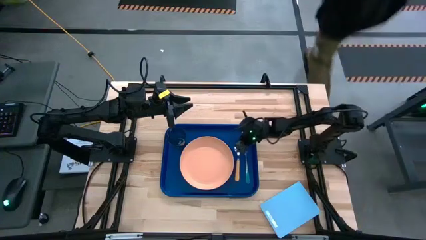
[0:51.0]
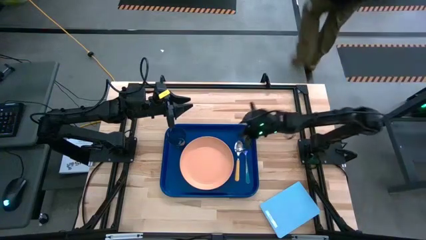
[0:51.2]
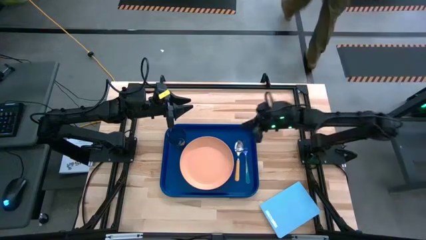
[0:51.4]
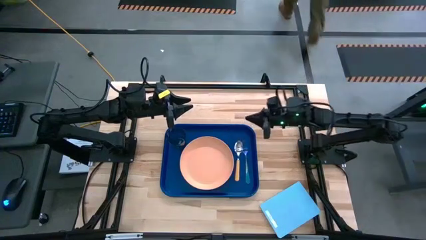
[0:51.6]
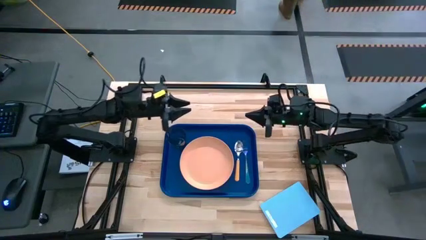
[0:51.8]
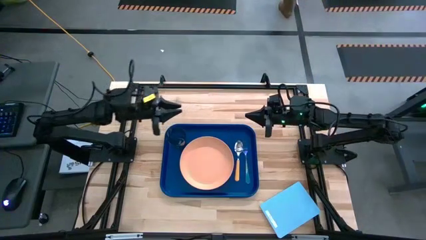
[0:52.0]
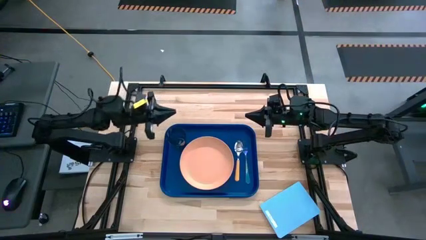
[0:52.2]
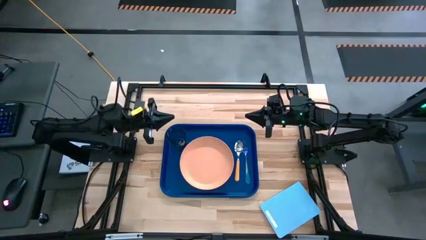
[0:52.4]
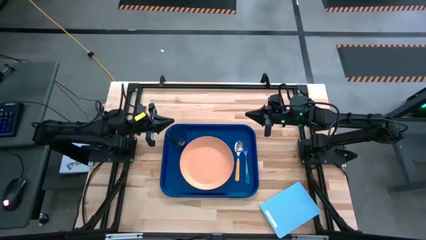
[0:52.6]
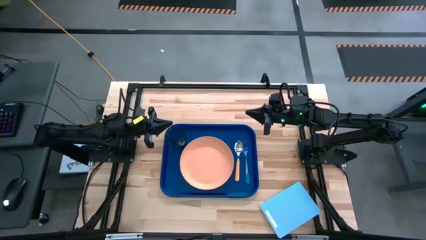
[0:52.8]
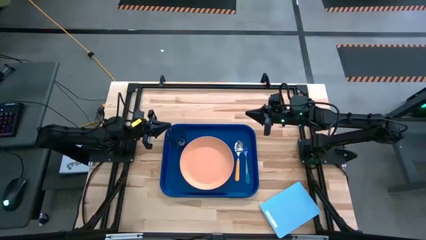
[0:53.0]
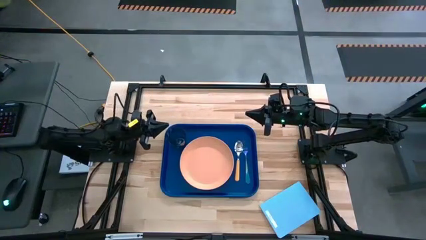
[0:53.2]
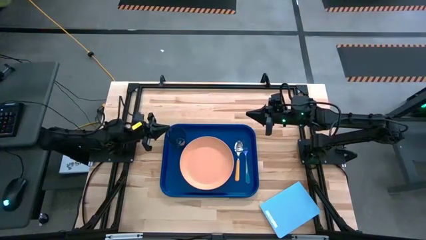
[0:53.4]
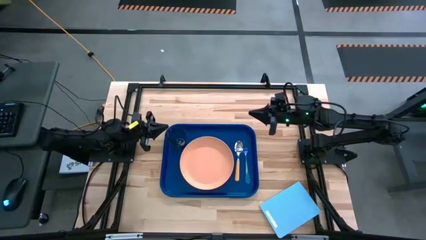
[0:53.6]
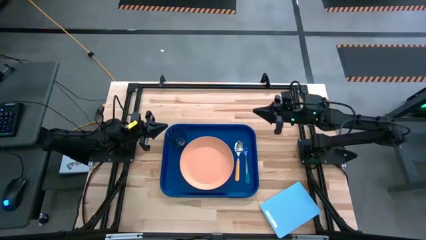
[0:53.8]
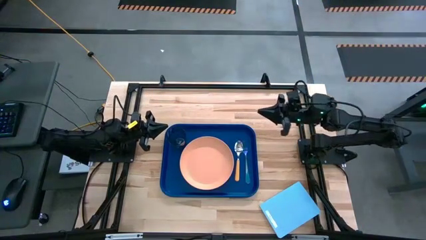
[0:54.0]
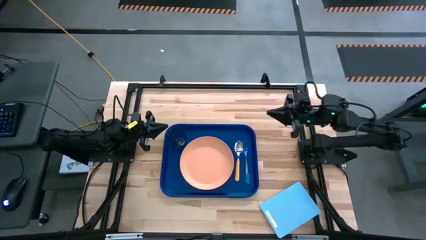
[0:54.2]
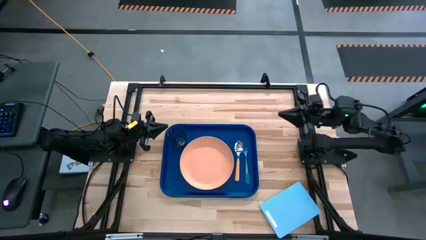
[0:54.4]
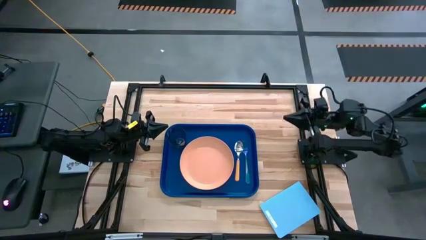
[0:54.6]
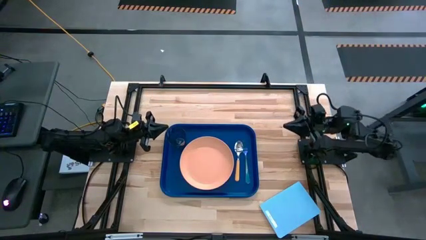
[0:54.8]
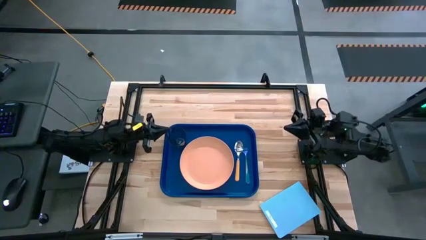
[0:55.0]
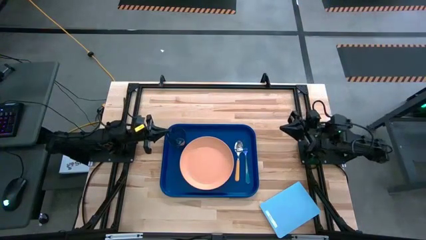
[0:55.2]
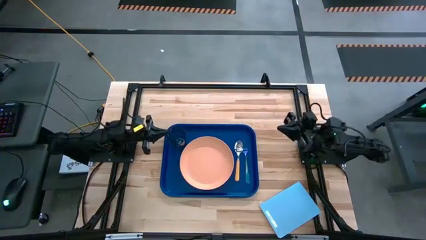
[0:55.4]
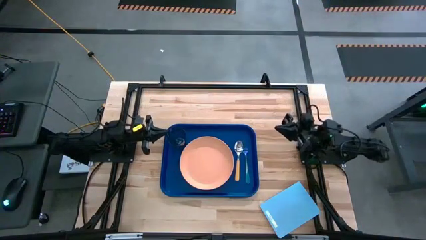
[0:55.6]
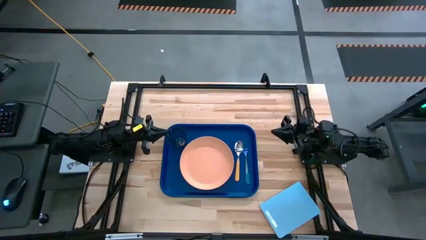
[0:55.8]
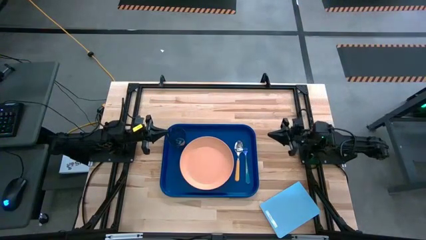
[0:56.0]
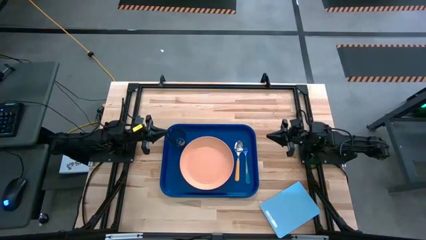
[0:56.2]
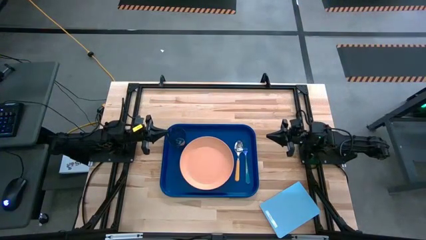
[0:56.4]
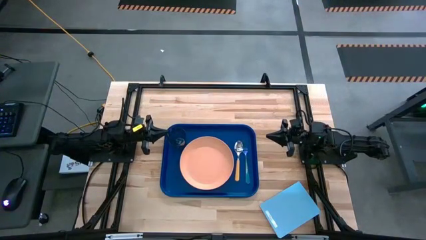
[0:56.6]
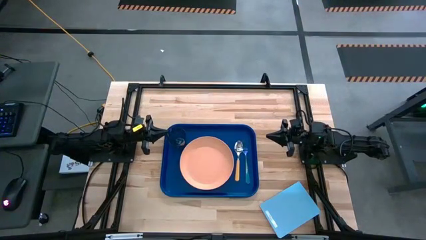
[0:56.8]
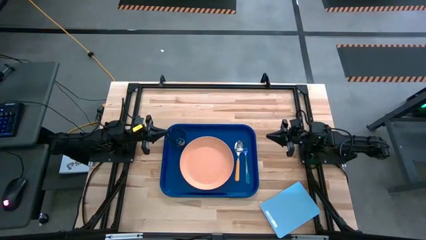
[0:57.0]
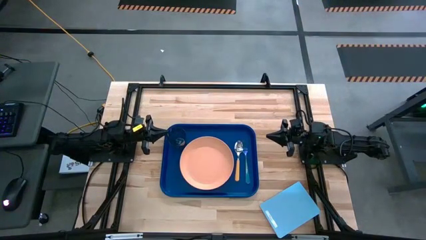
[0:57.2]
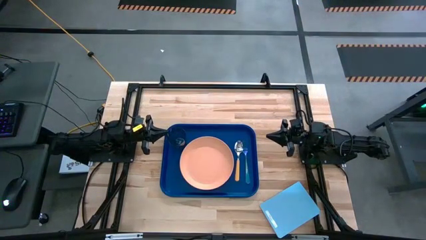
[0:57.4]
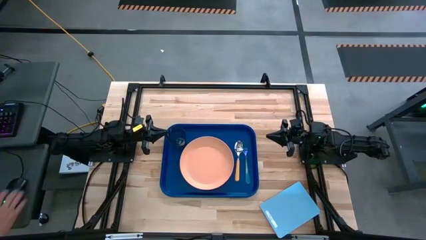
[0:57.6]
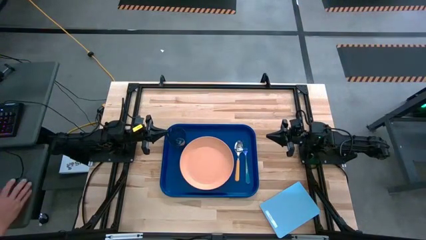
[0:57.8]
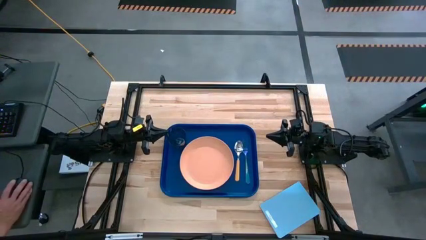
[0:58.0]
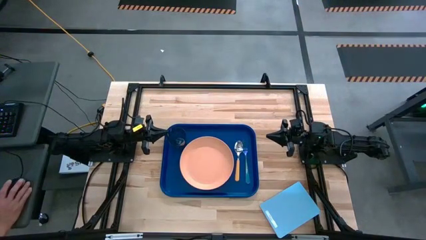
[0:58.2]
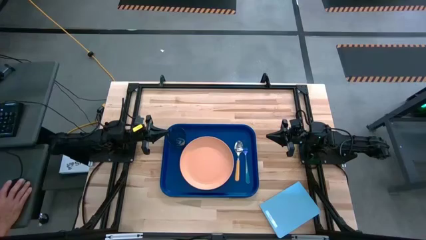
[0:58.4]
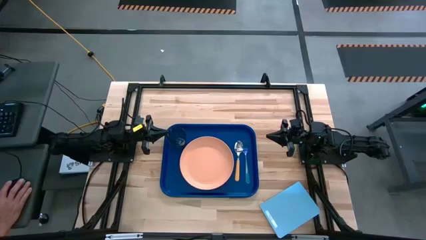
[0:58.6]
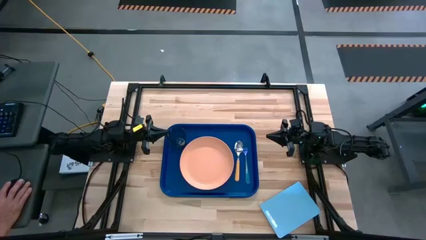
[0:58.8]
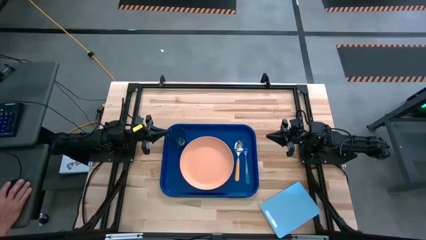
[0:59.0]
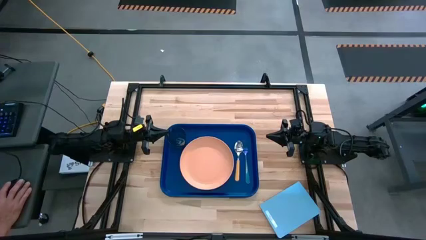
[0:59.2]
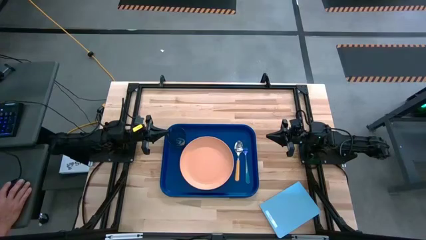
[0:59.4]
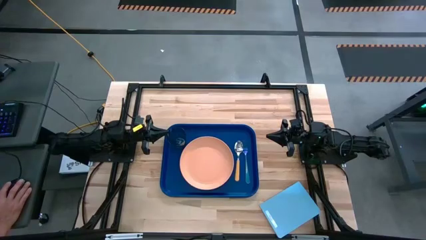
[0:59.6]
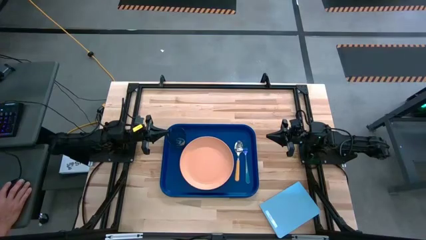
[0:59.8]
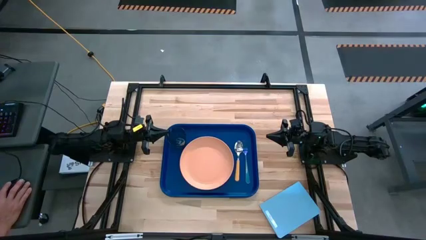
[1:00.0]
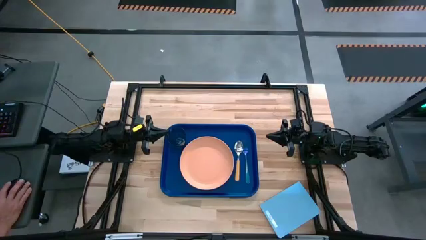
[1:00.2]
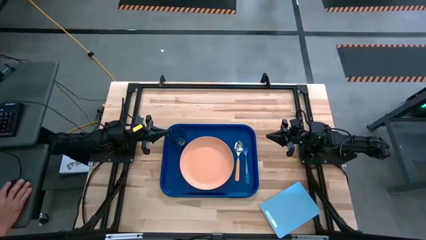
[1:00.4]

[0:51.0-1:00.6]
Task: Pick and place plate/cup/fork/spoon on tray
Return to Home Position
